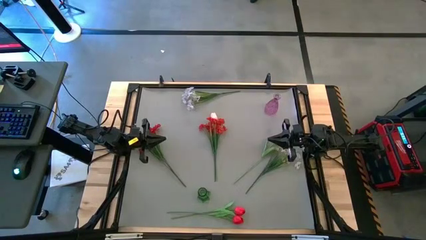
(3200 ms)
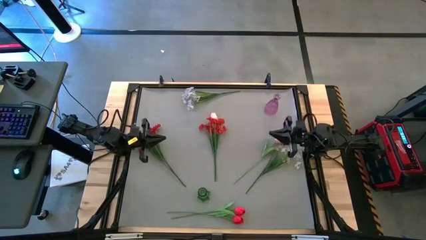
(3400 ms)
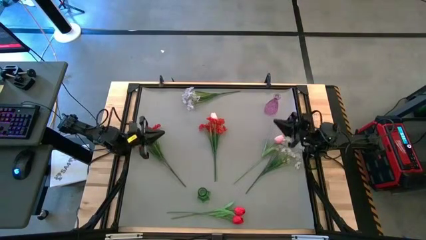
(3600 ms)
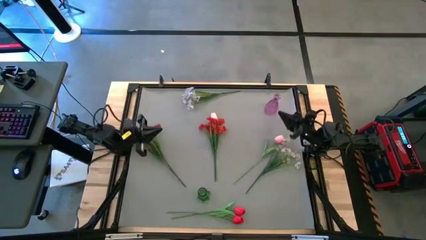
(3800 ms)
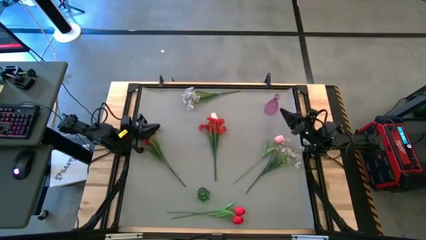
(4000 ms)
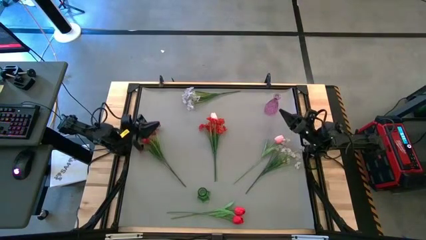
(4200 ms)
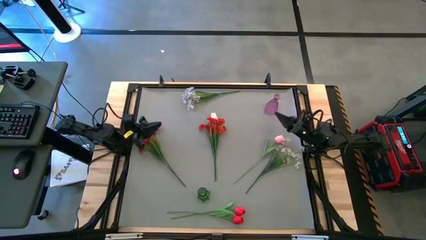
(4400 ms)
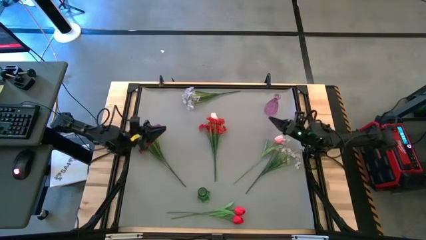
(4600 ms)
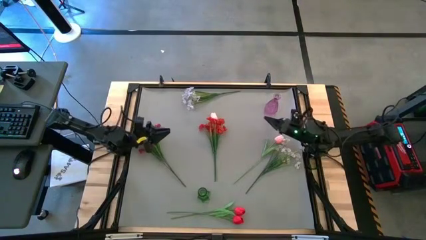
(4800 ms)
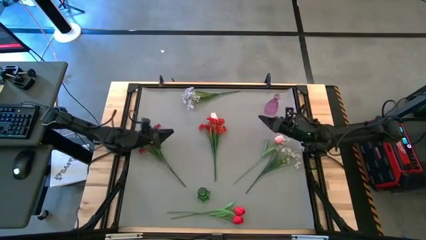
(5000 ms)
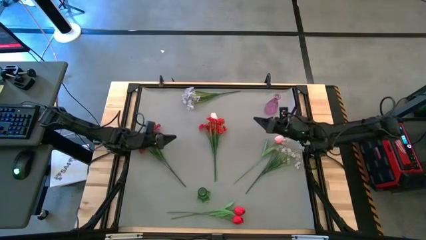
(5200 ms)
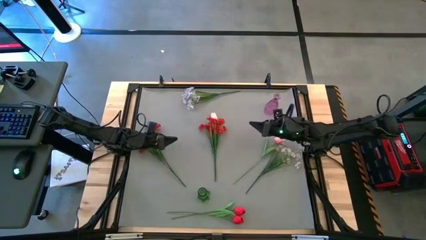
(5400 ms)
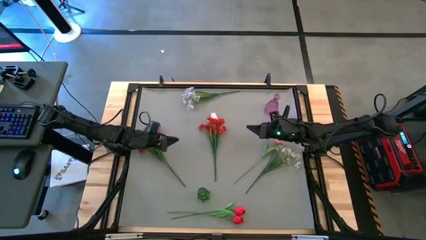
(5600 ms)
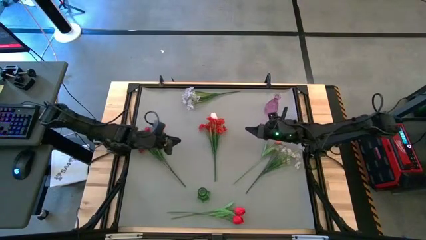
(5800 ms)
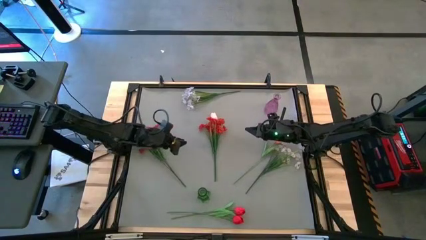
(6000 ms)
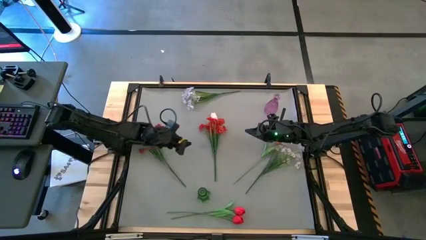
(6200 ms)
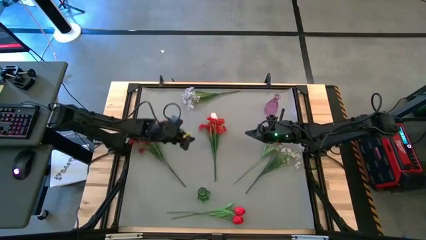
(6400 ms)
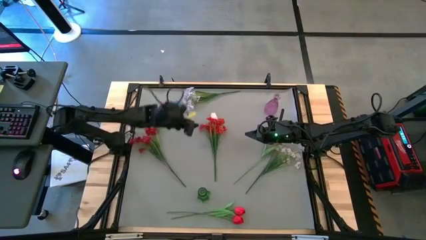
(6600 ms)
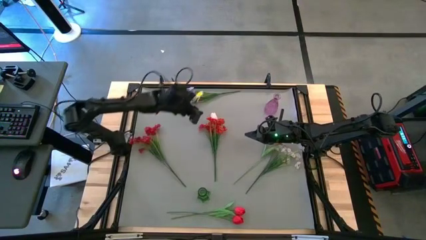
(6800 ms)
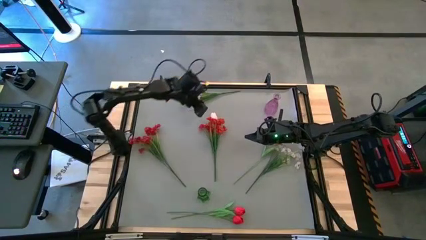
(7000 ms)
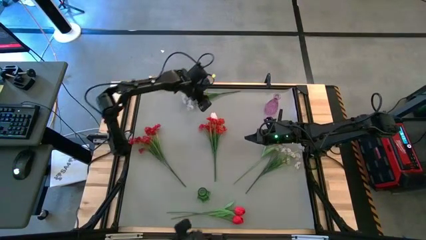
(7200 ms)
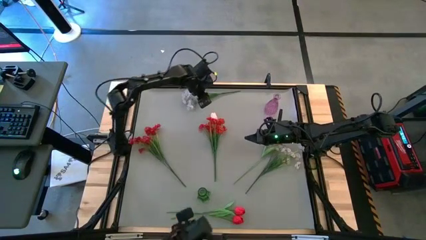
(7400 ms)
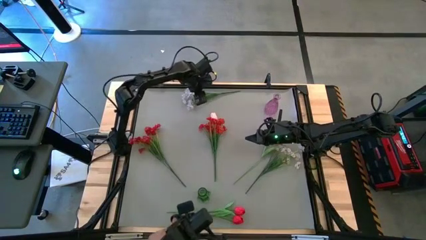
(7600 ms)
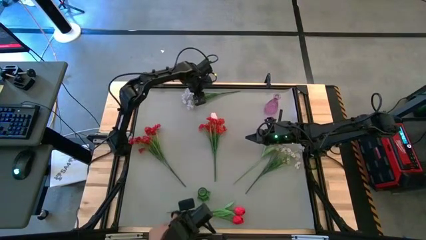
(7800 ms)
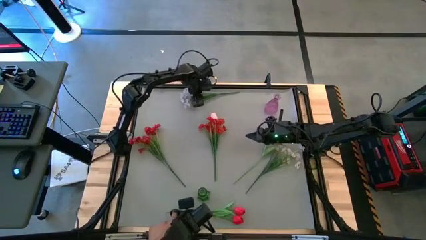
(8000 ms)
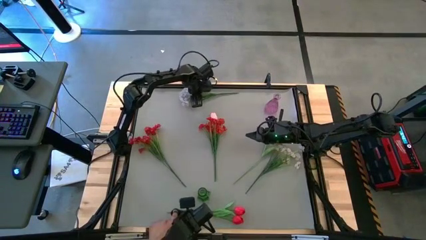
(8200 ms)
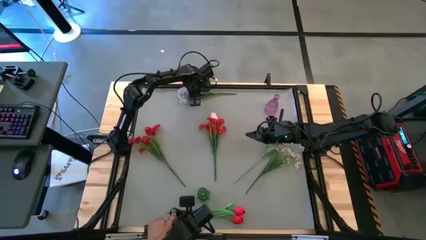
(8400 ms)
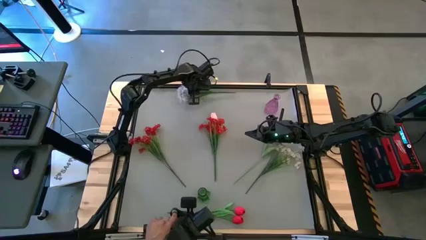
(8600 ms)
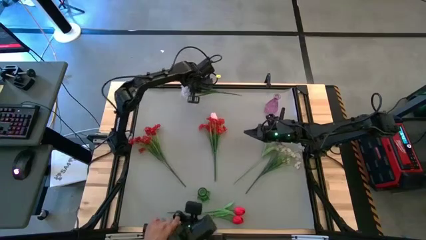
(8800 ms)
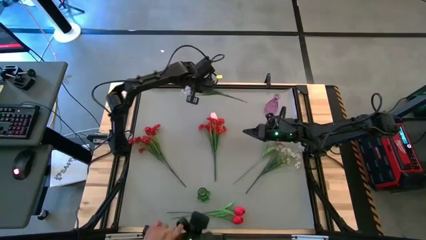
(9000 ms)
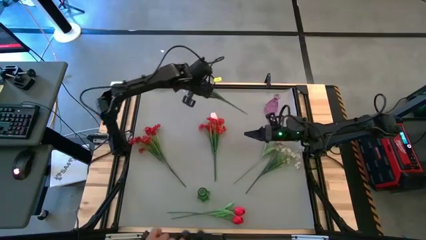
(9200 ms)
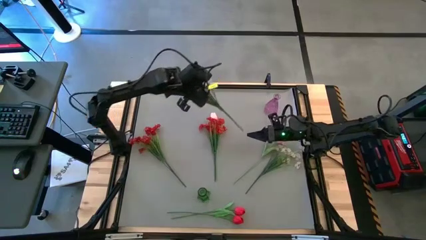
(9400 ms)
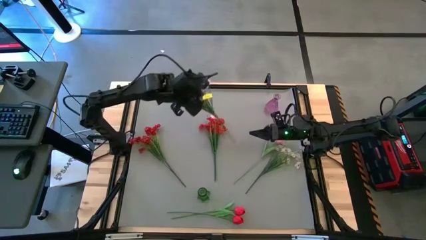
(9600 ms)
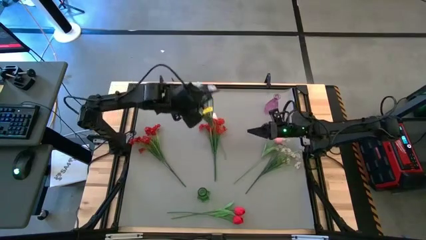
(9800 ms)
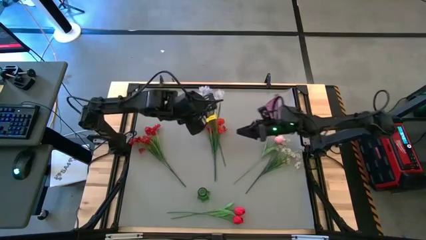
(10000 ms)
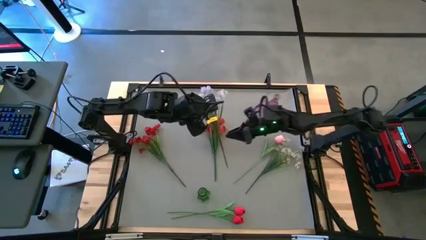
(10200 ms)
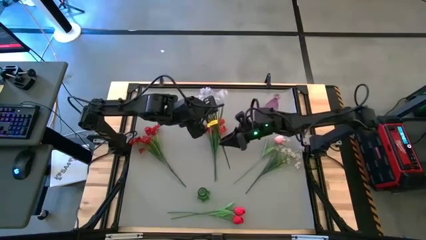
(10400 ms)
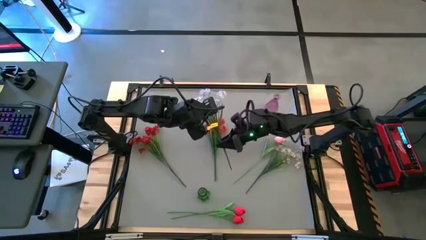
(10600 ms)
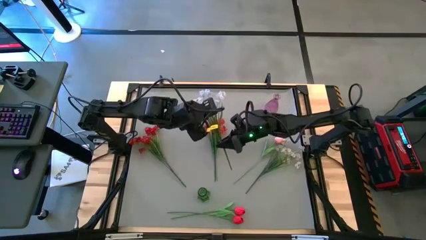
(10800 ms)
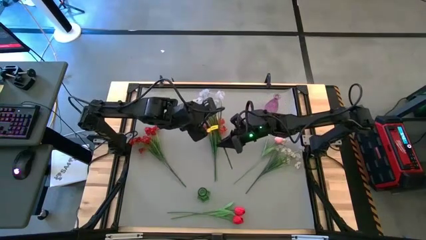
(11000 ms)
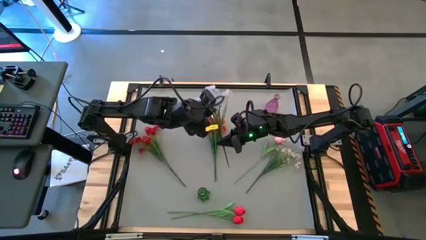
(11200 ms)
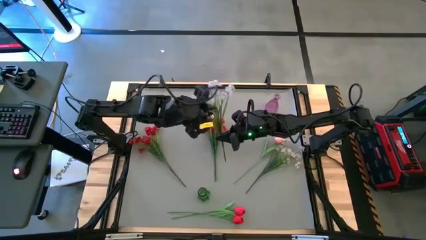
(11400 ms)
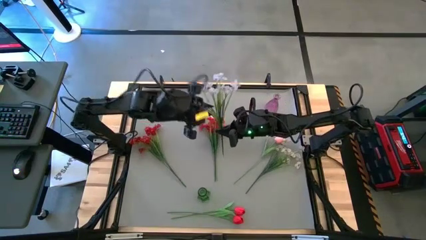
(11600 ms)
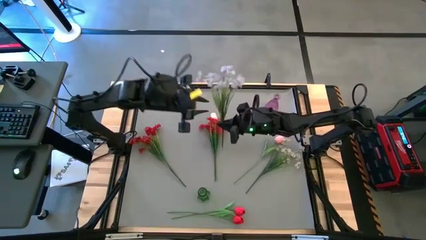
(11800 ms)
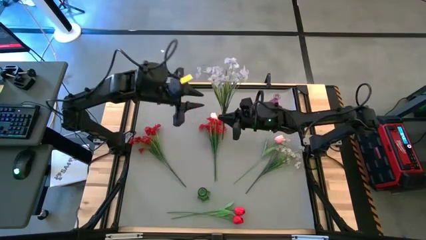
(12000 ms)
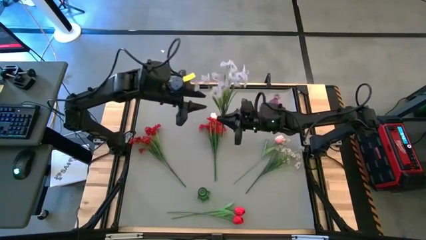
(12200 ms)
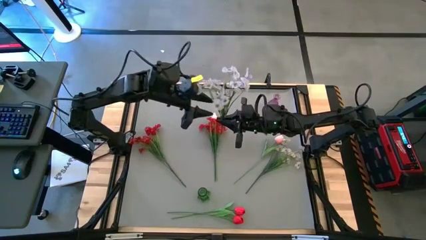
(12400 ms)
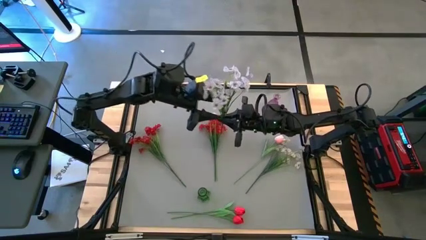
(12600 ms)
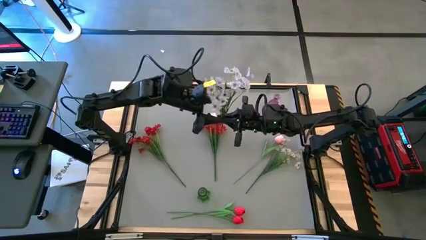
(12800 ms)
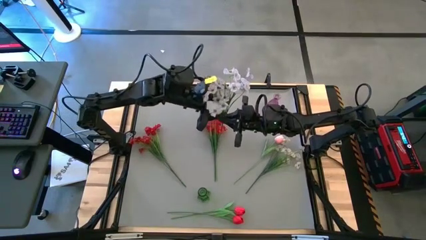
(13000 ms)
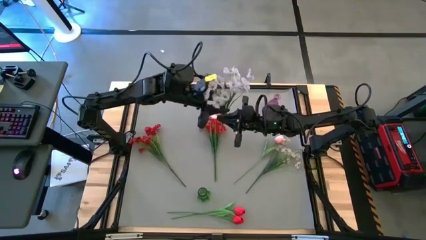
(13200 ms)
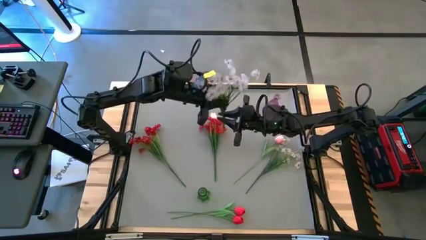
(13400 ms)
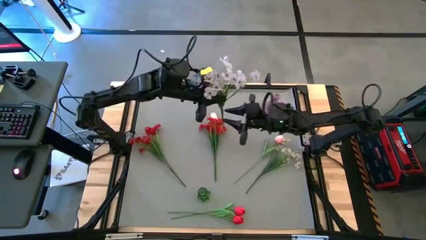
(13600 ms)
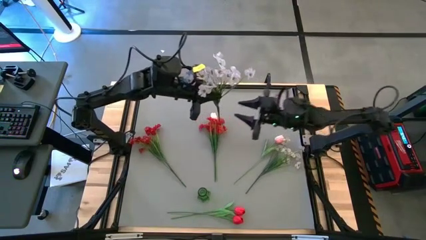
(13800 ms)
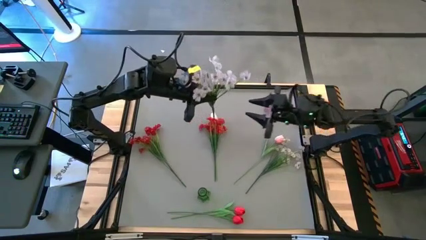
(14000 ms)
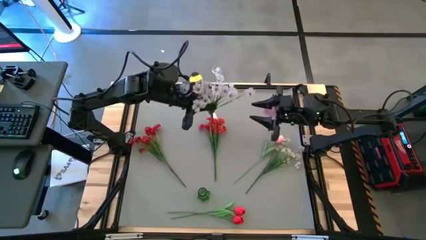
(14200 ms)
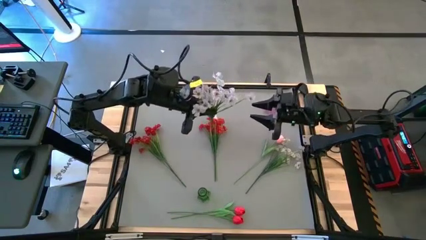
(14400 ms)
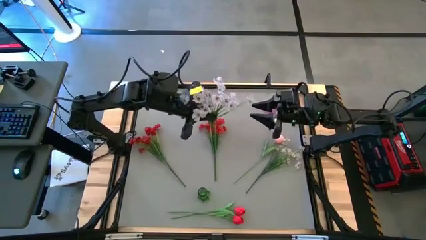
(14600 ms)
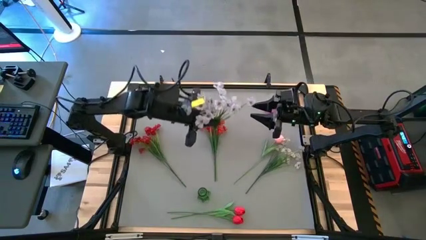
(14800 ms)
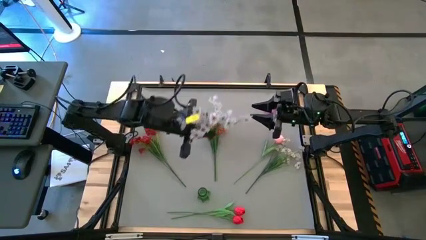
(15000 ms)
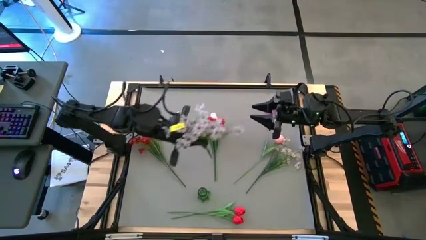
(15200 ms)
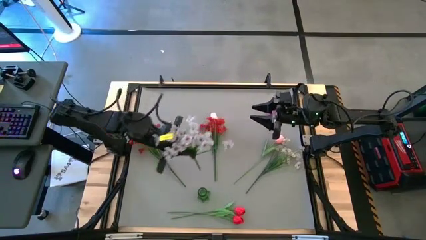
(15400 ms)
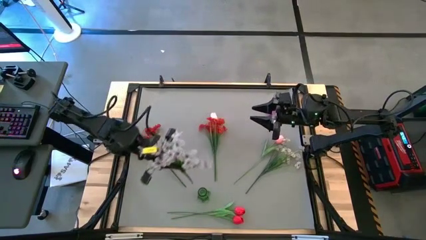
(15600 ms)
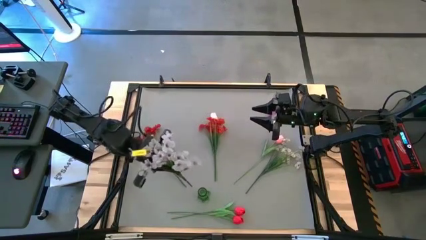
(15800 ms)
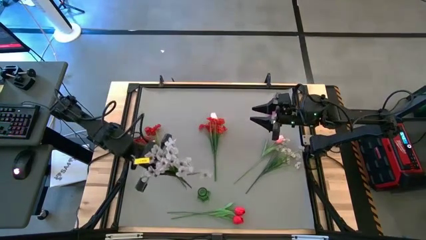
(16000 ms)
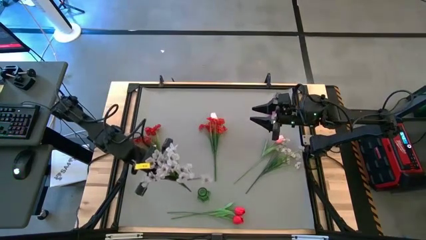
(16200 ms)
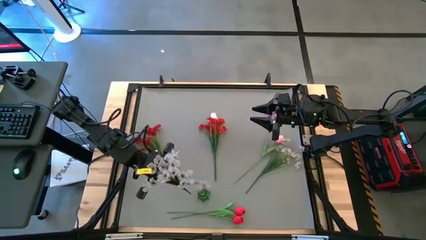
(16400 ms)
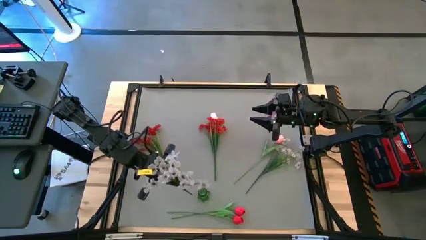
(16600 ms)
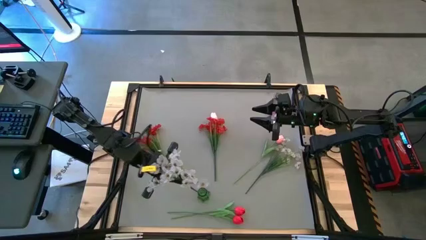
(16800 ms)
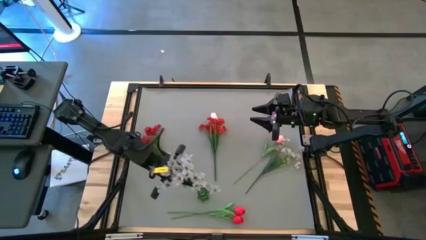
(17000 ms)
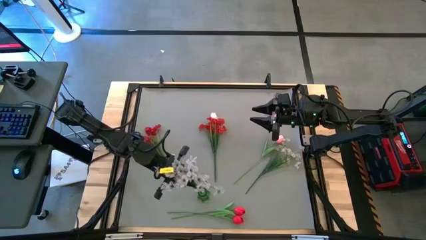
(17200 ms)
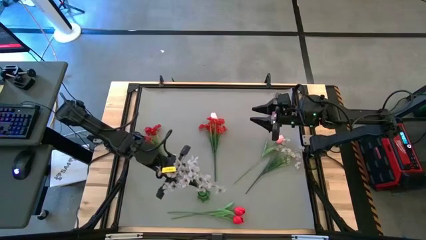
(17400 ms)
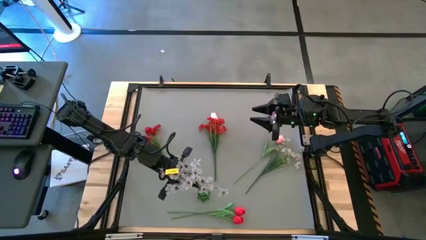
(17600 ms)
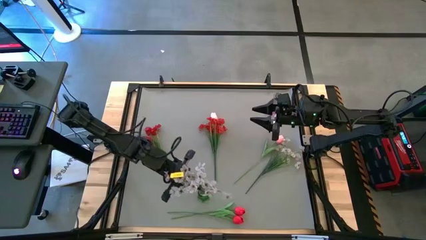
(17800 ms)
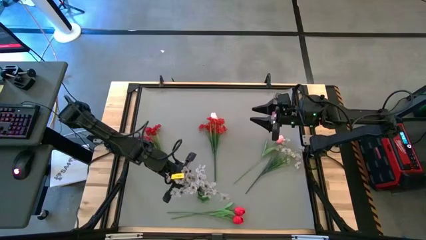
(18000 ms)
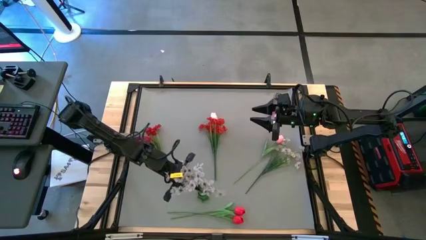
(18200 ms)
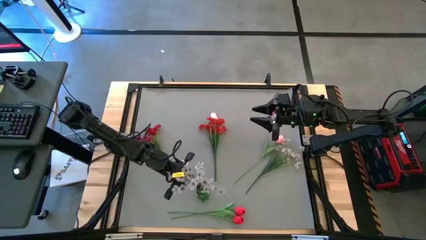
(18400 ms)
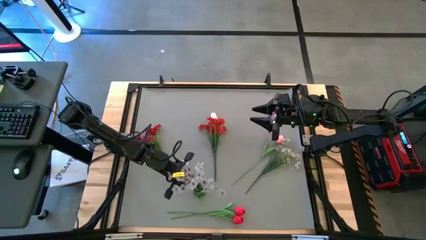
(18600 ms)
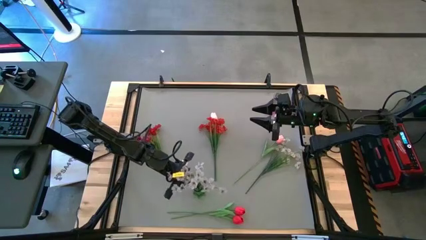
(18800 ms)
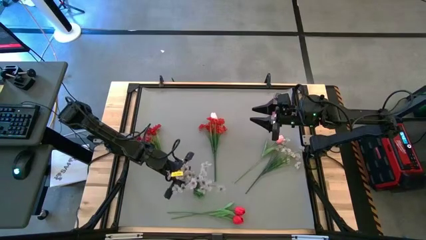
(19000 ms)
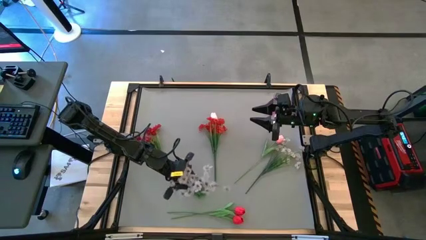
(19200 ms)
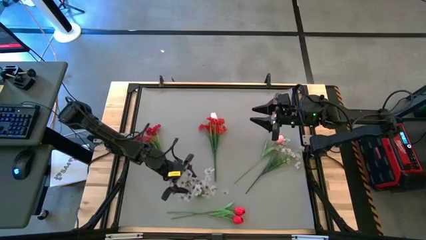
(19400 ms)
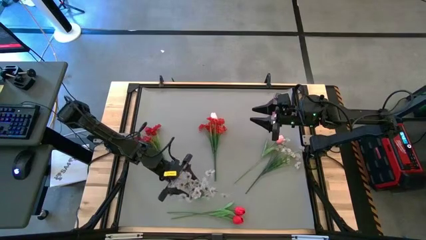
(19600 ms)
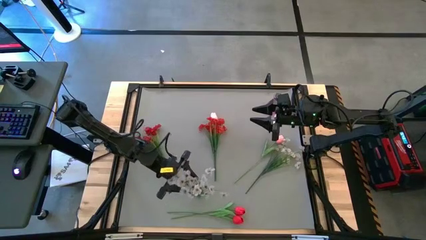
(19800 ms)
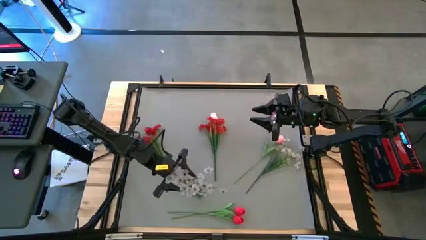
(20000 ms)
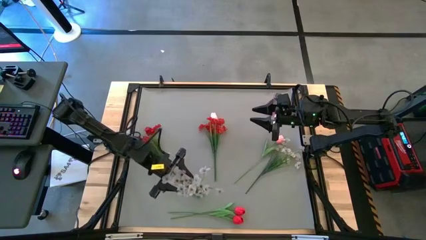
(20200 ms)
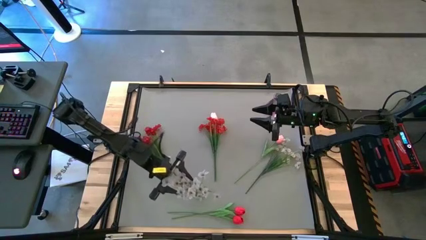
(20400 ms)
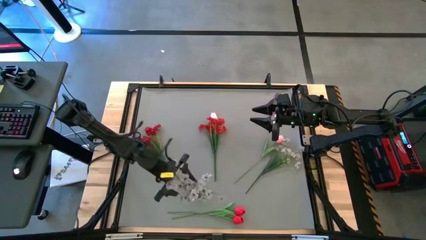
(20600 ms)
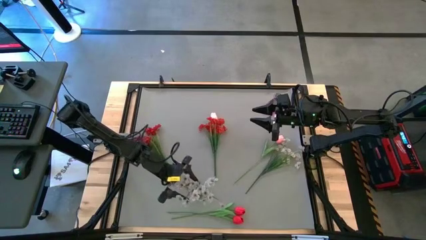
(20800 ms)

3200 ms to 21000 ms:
Task: Sort flowers into vase by color
Put the top white flowers into the green vase
